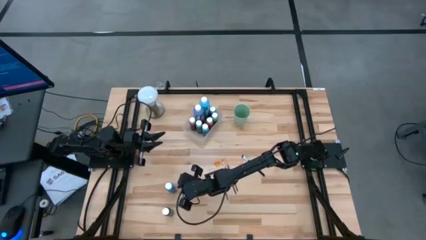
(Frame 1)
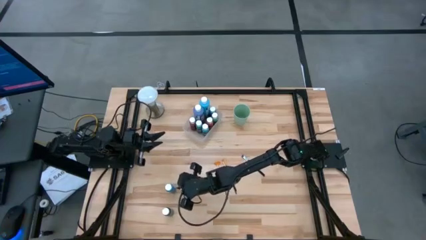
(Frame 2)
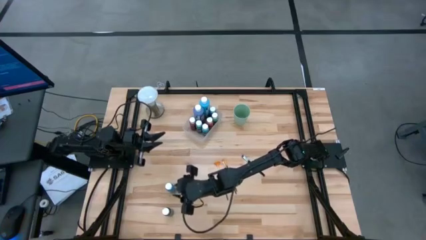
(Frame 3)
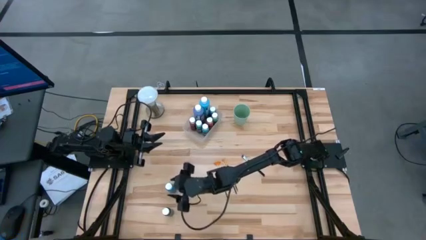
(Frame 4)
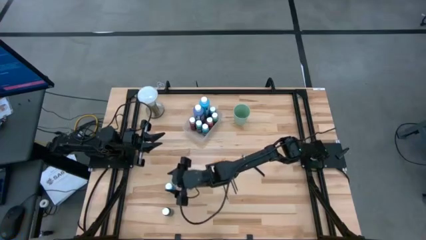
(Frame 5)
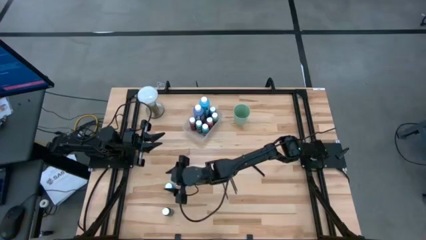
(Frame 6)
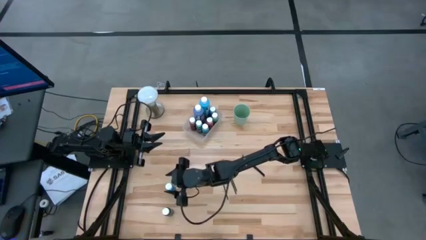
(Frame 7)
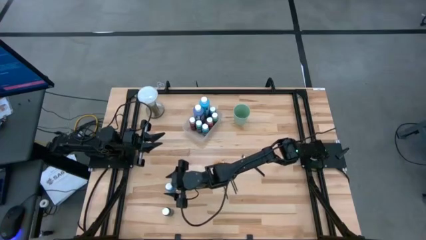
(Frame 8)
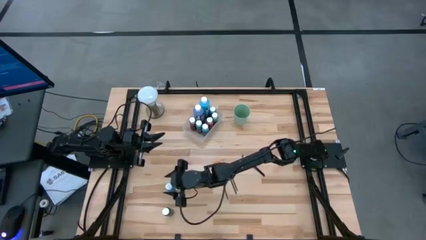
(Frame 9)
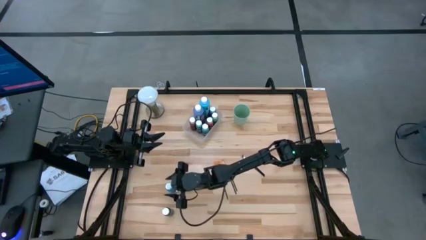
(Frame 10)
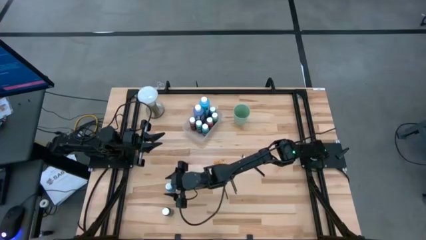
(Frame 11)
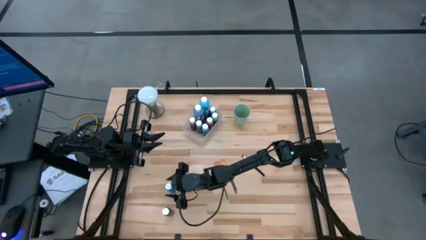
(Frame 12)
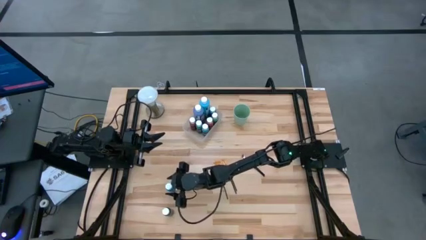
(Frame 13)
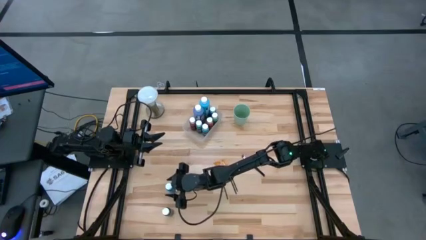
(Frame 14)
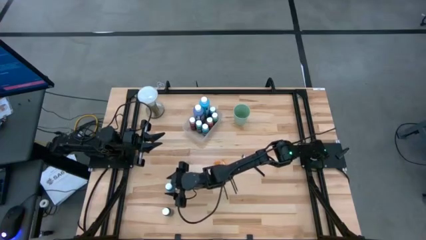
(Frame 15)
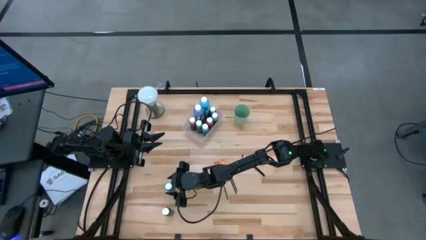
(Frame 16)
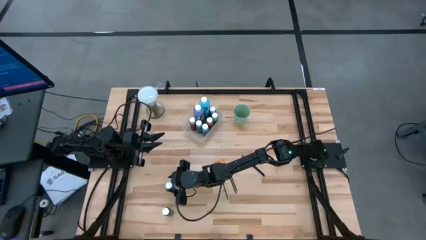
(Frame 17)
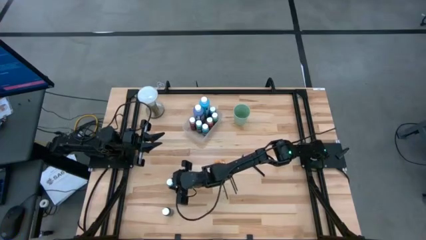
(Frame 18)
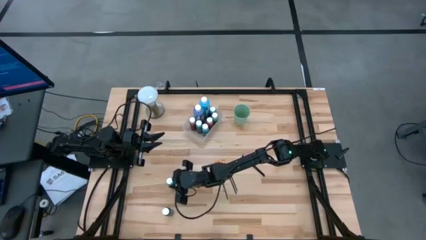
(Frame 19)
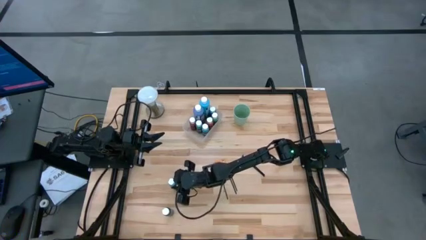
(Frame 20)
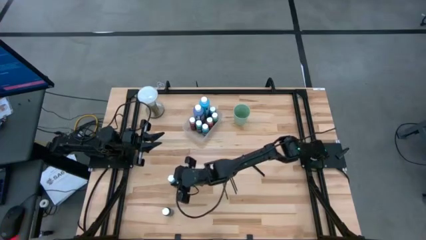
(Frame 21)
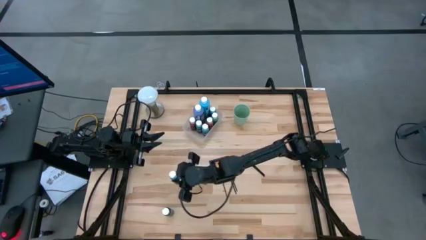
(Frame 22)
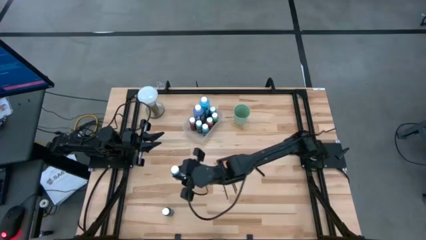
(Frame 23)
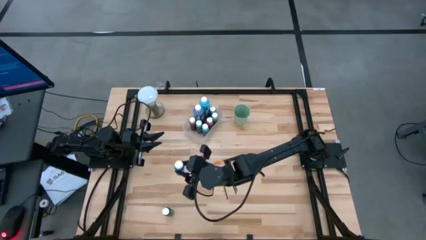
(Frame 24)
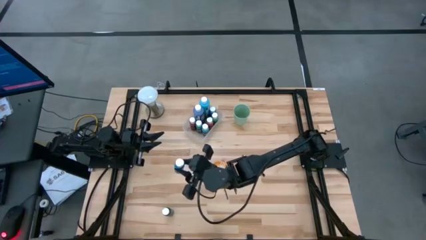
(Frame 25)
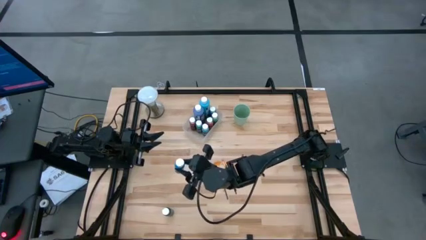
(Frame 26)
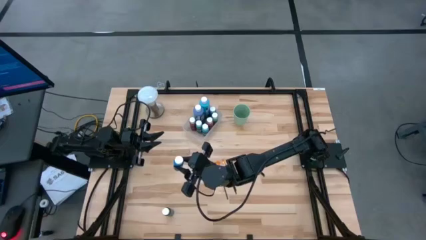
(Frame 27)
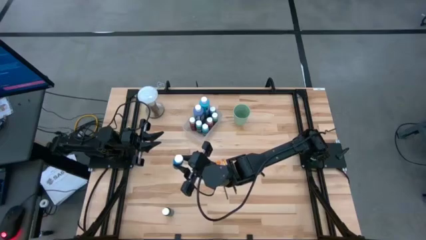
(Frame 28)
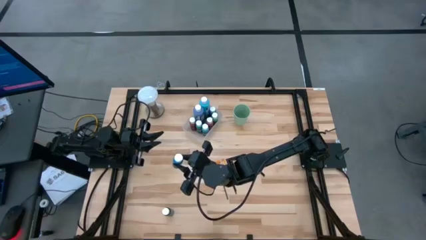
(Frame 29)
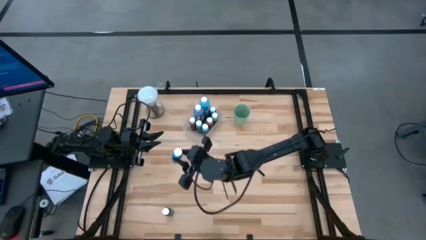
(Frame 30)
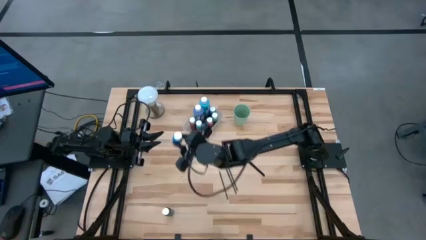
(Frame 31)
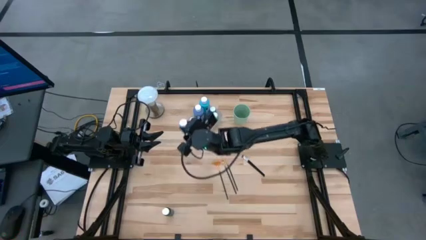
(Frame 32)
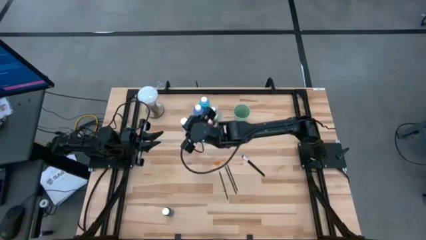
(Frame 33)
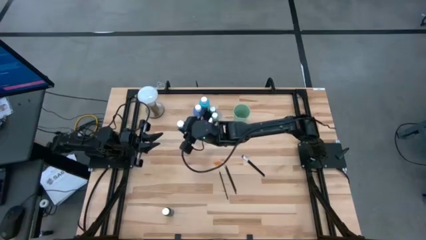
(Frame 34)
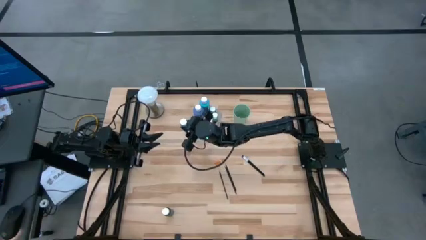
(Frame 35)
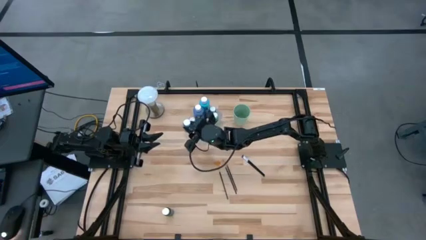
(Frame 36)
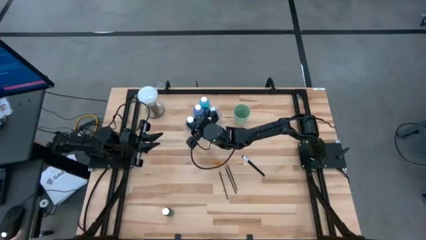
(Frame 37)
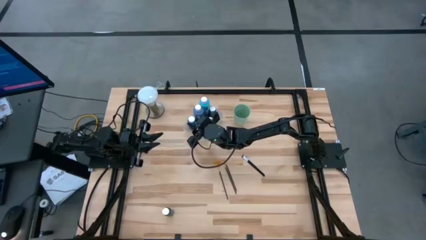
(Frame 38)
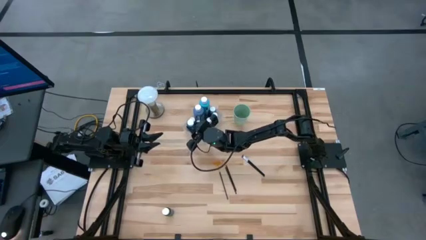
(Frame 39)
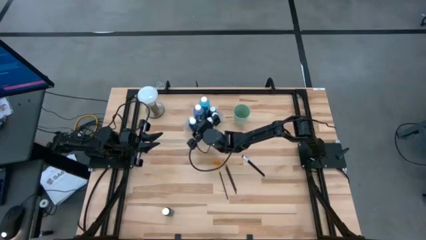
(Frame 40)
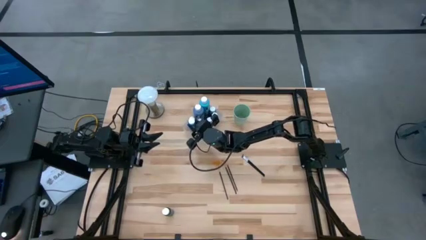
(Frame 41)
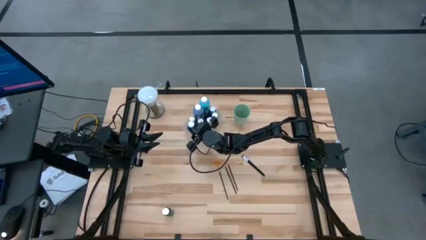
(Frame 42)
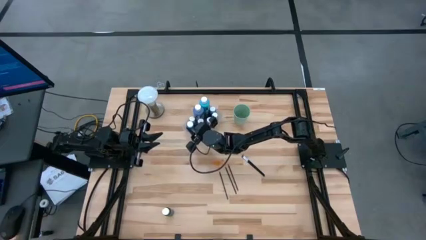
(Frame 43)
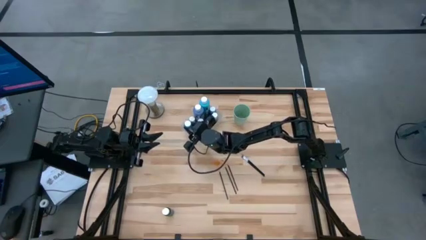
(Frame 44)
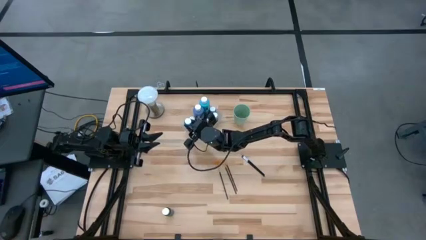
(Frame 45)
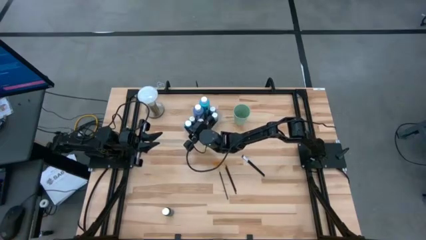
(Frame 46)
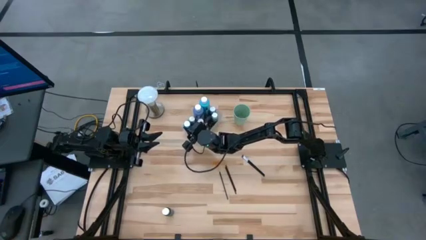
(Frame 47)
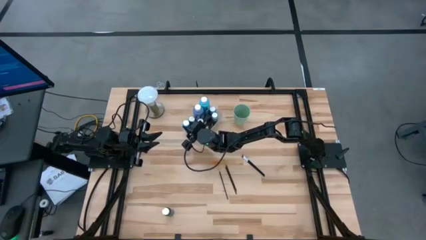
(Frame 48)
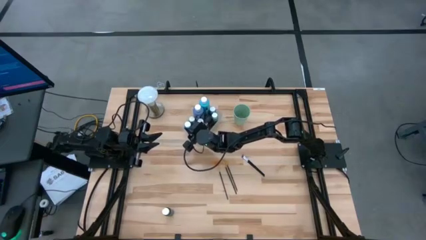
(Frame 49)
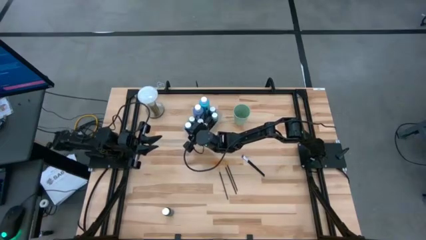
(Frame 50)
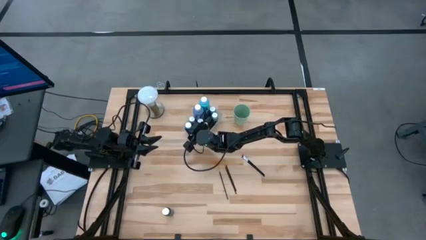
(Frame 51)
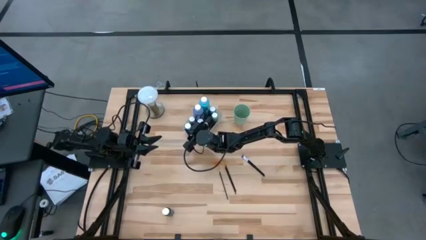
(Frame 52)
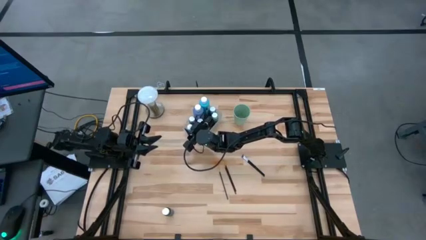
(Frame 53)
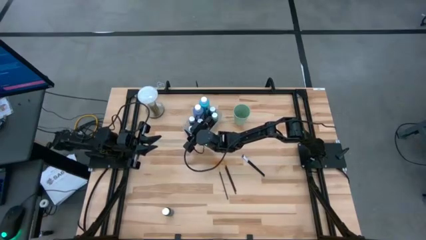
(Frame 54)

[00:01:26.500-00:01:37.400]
Task: Pick & Place Paint Supplies
Put the small blue paint bottle into the transparent bin

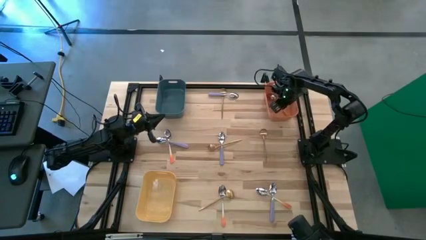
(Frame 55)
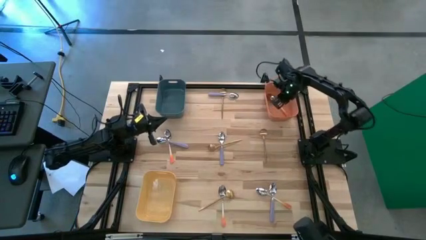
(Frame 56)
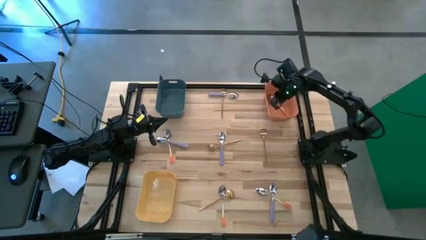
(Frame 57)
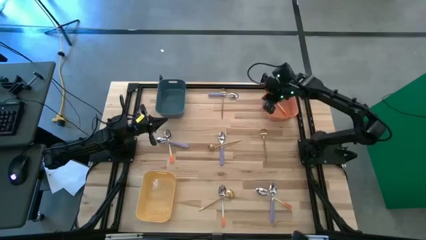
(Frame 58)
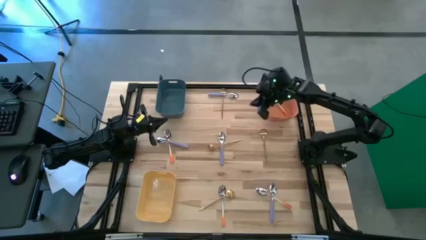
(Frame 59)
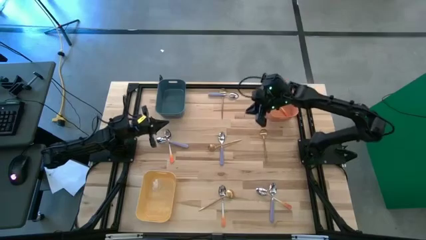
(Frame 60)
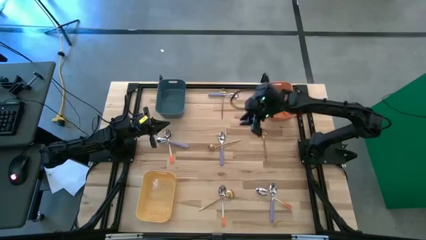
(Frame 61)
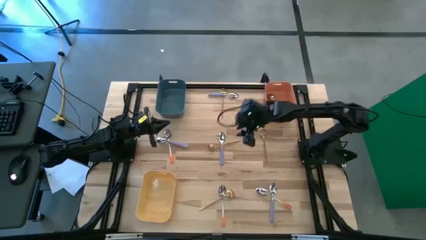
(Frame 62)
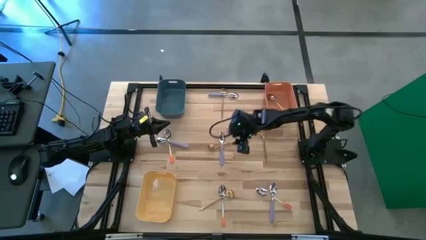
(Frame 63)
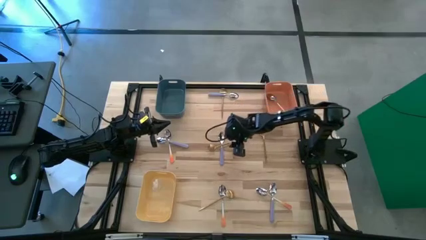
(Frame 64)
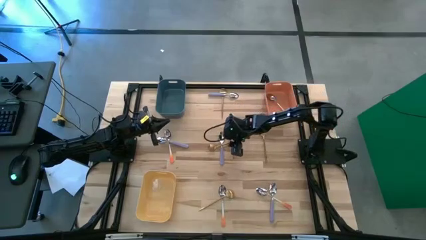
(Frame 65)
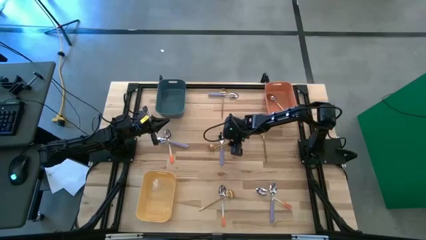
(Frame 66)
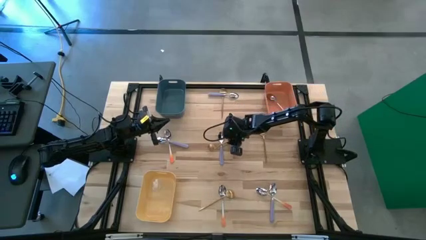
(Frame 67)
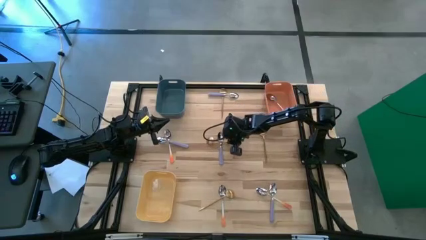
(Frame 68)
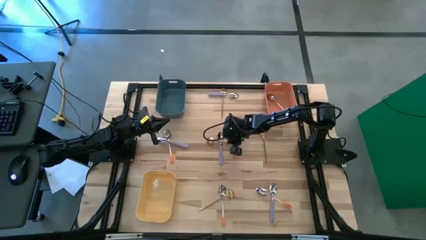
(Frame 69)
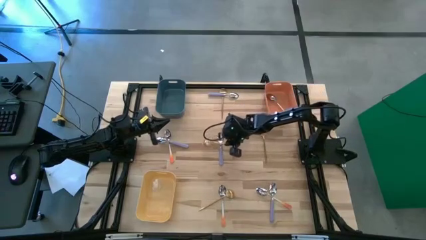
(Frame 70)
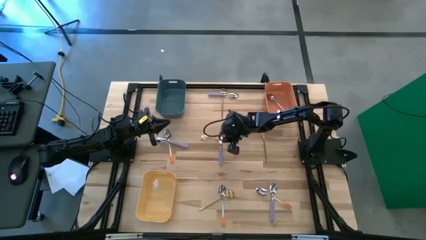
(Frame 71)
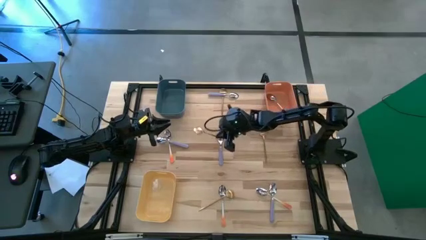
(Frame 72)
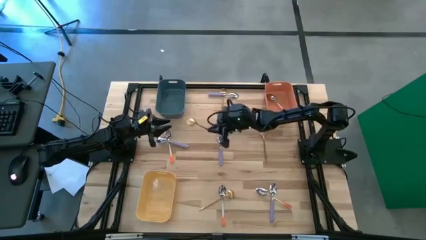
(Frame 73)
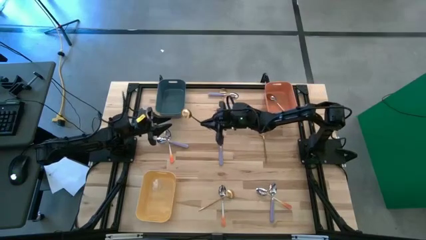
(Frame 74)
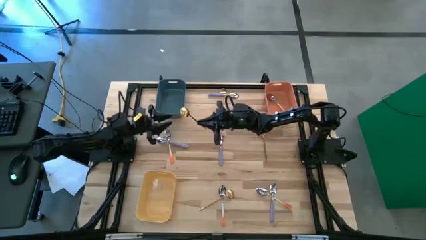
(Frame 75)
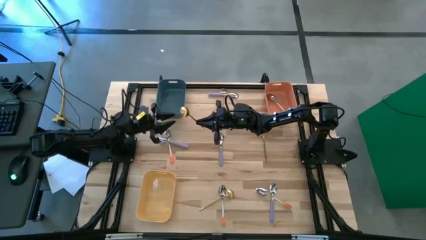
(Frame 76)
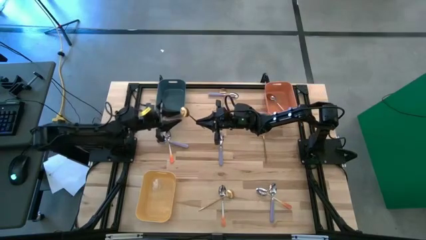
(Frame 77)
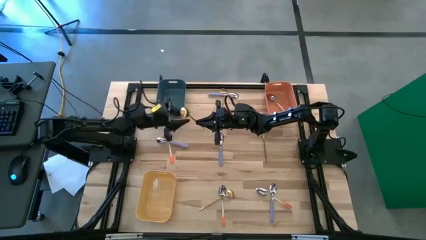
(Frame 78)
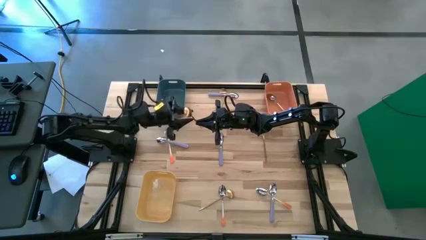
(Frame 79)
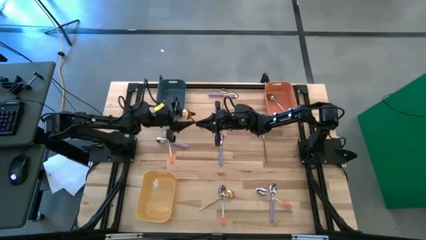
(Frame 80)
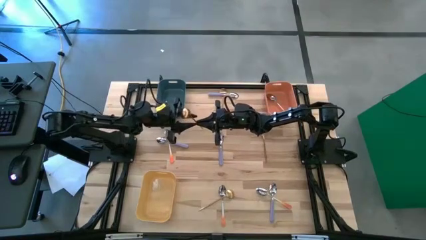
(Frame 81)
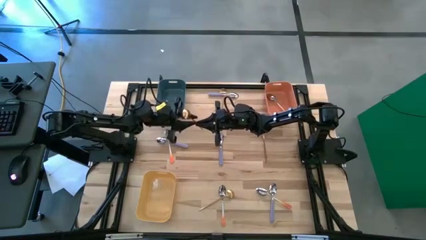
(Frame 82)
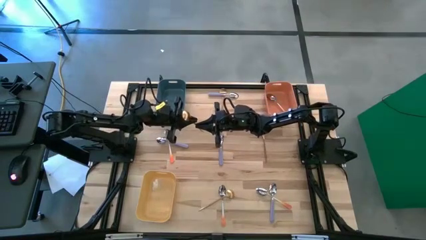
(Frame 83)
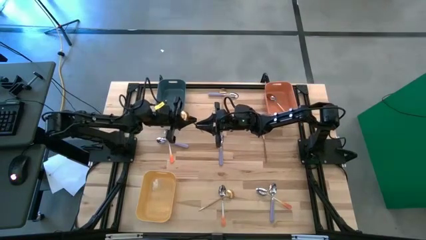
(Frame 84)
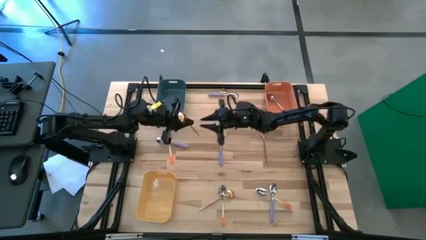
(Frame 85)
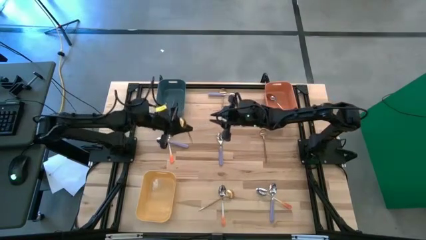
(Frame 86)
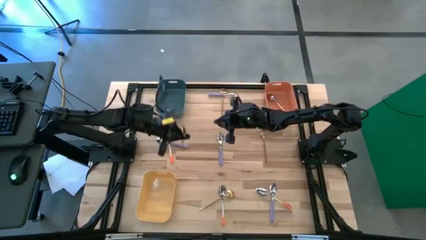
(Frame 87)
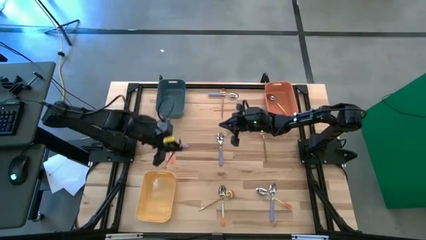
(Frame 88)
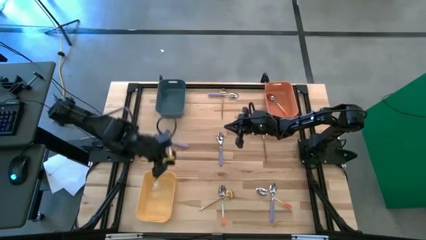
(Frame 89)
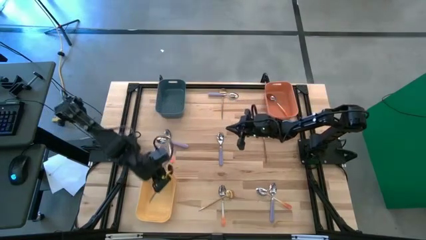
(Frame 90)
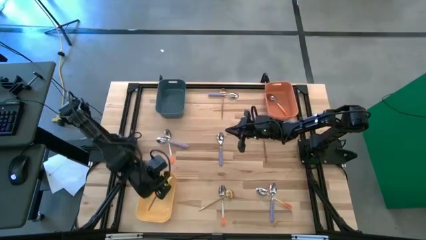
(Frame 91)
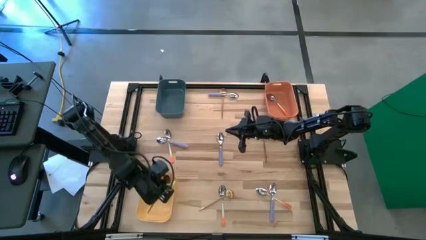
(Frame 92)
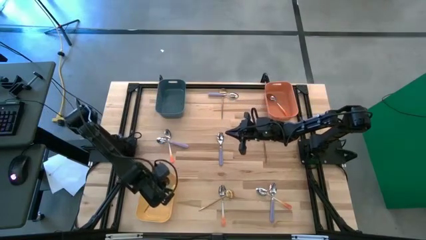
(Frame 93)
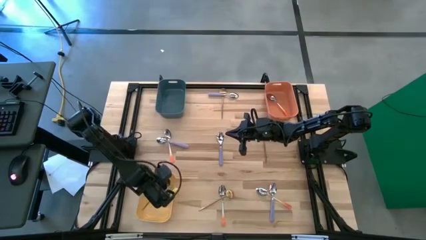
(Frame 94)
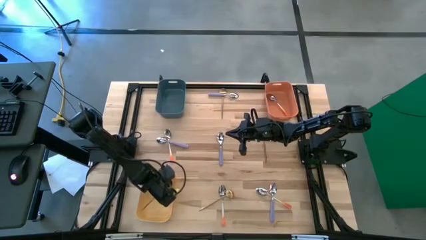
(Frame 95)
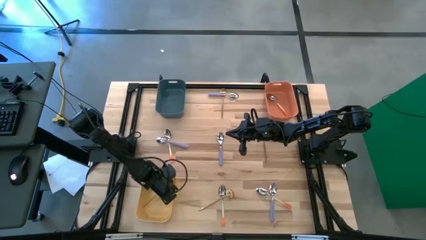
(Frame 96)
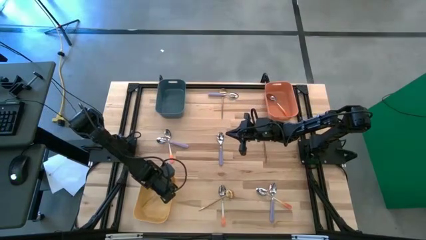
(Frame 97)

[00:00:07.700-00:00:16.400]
Task: Sort silverware by color (type)
Put the center gold spoon into the yellow bin
